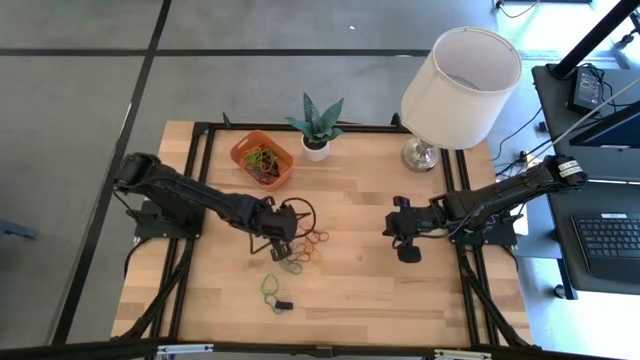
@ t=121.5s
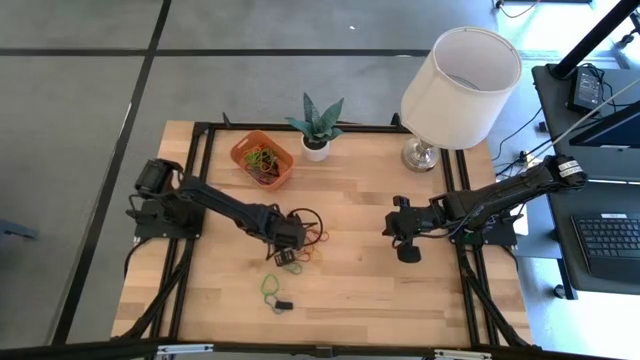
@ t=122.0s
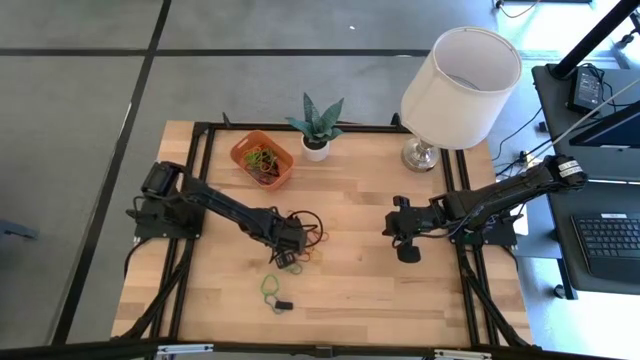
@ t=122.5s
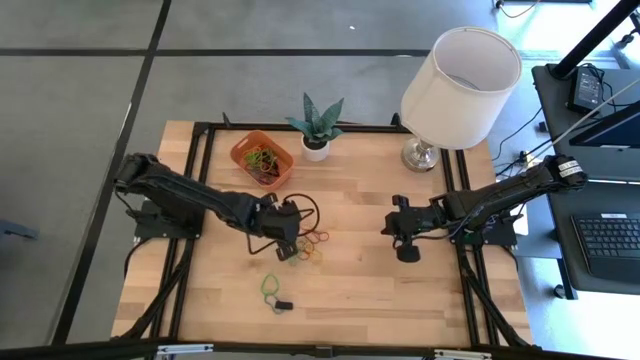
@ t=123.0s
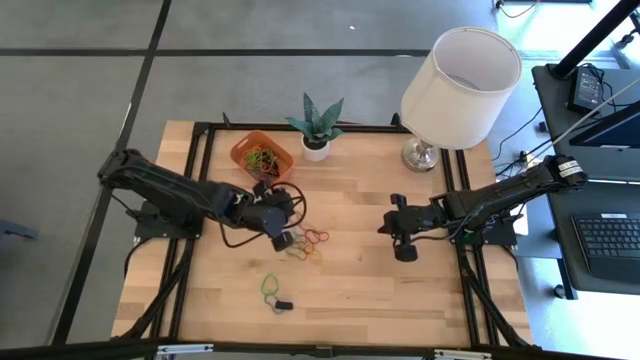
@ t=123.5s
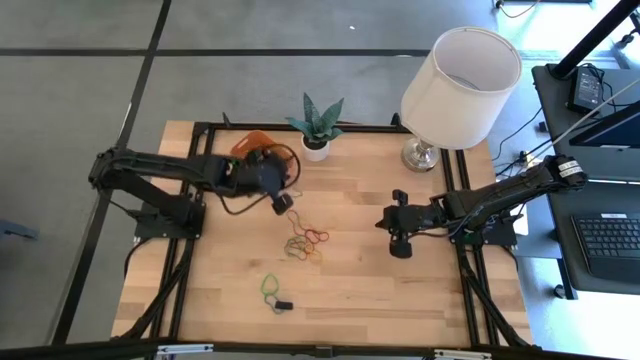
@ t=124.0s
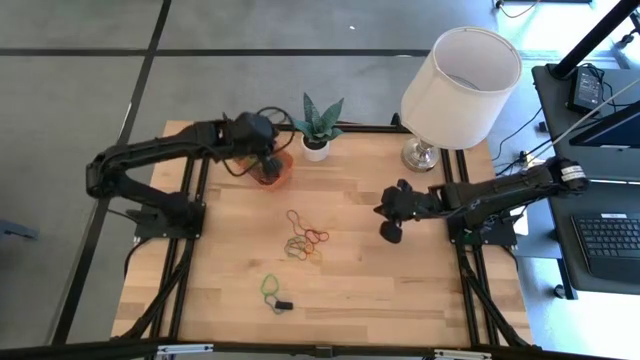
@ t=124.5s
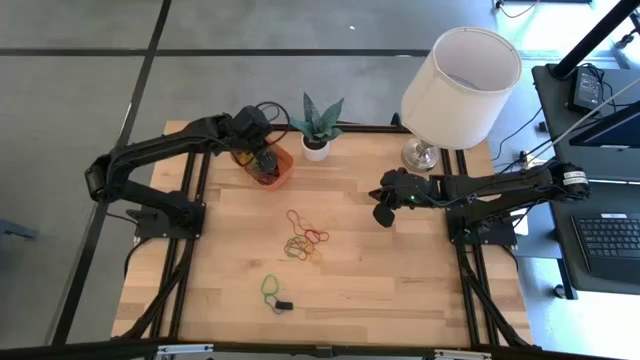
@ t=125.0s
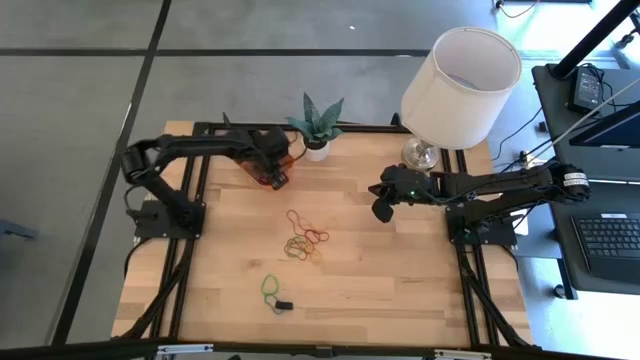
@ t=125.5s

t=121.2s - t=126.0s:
Task: Pick and place rubber bands into bin
Put the blue rubber band into the orange bin

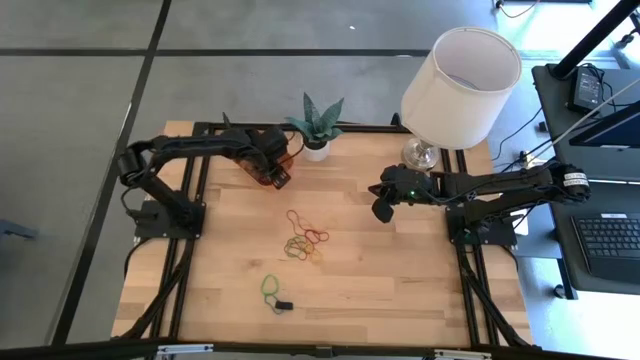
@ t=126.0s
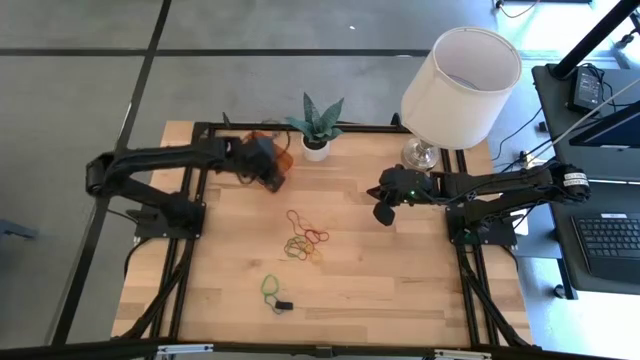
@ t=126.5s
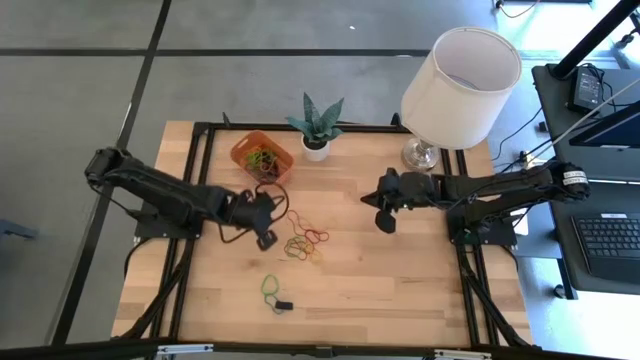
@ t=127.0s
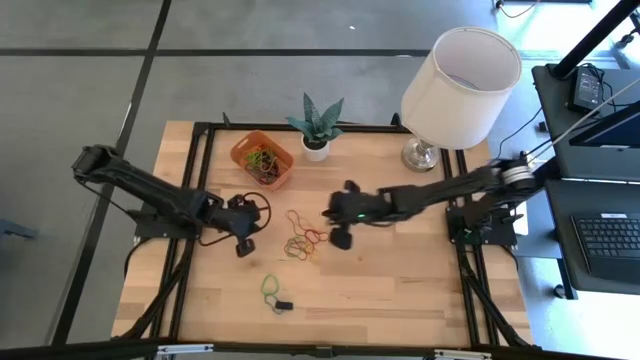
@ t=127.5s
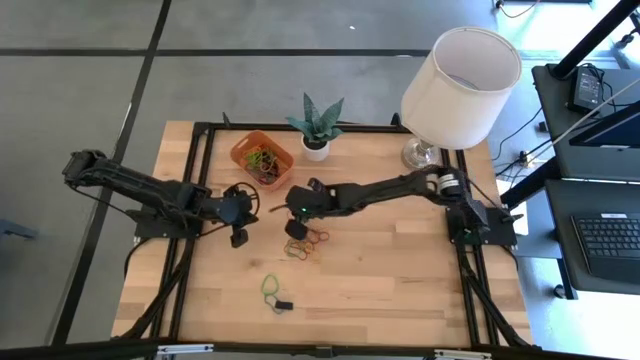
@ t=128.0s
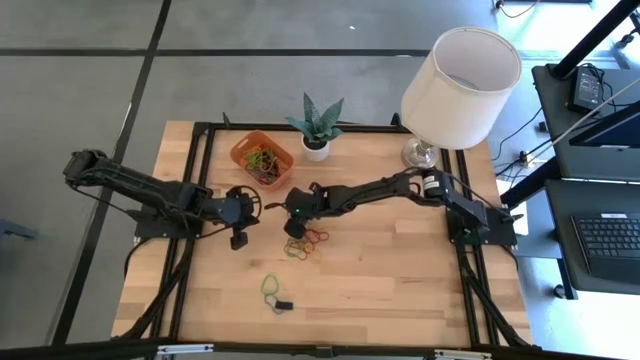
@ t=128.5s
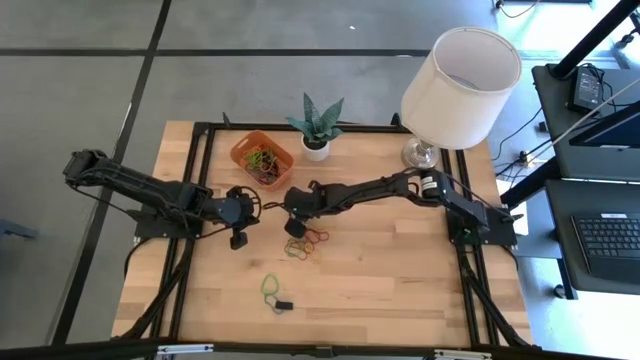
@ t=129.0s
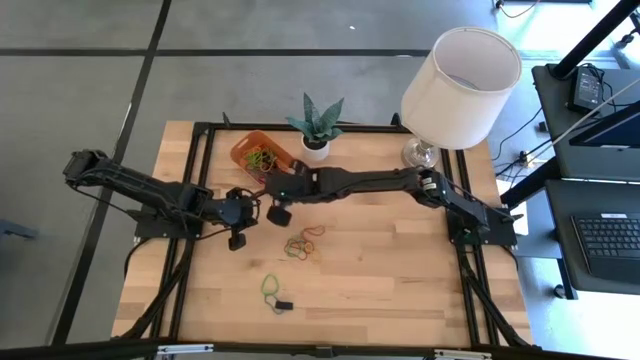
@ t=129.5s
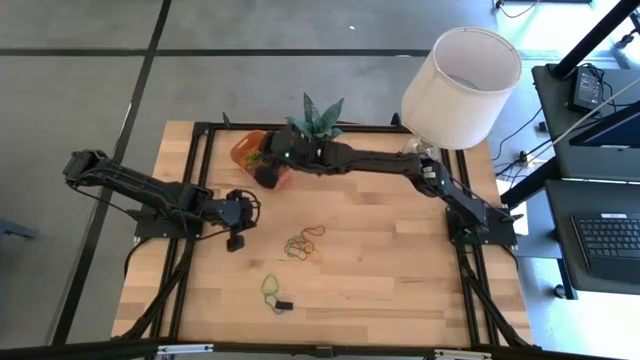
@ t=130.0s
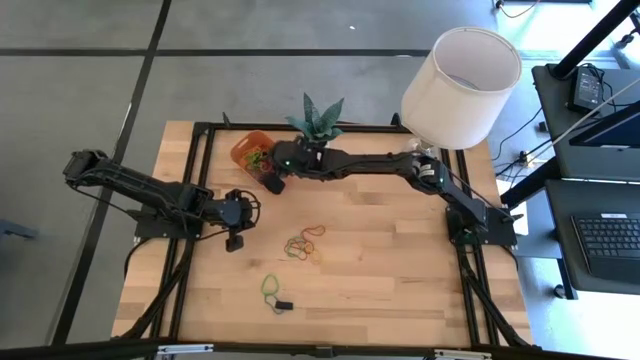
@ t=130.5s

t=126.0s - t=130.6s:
Put the red rubber band into the orange bin

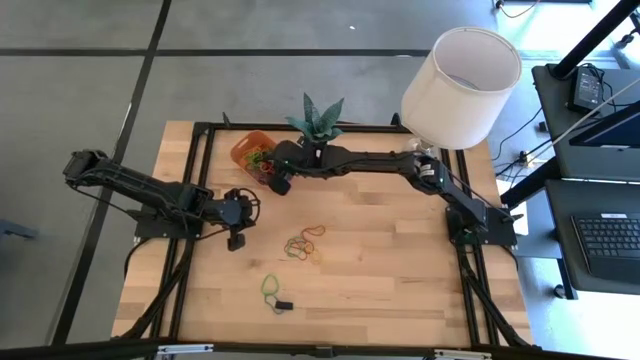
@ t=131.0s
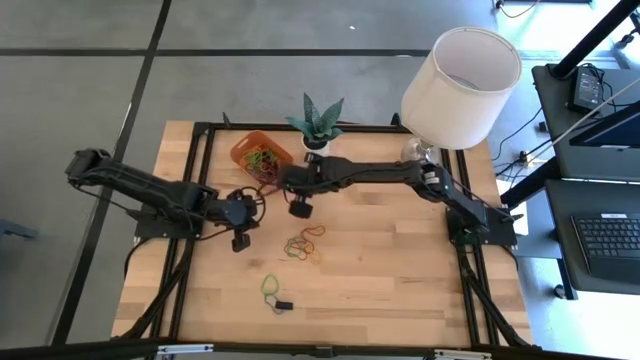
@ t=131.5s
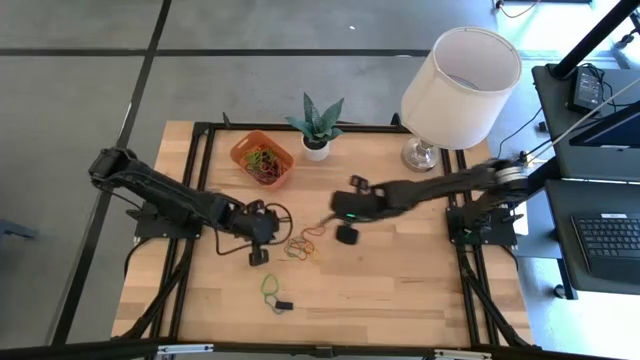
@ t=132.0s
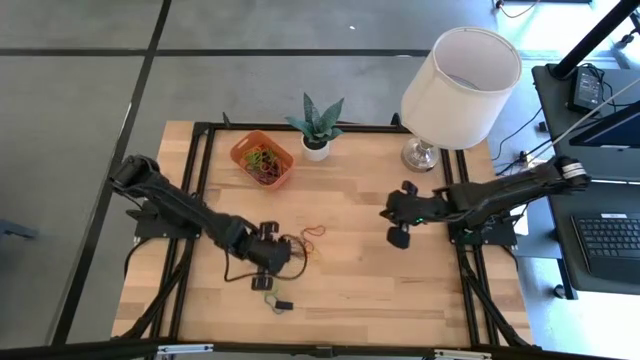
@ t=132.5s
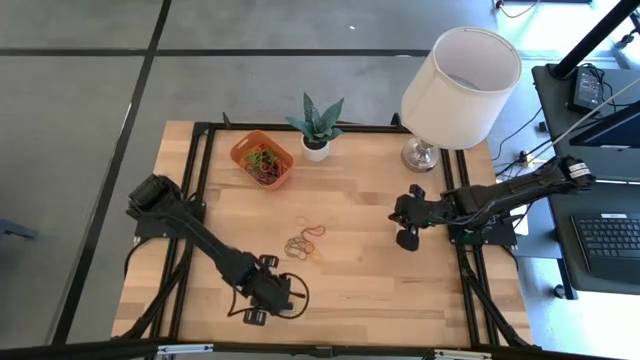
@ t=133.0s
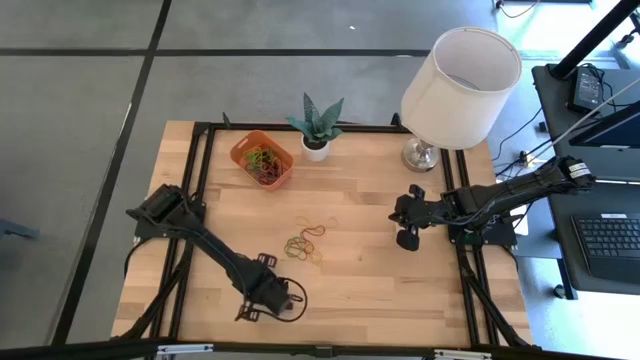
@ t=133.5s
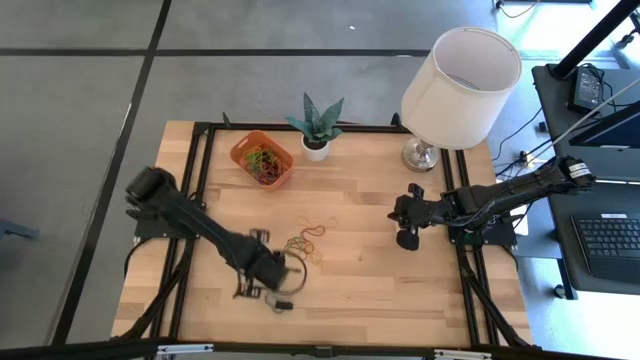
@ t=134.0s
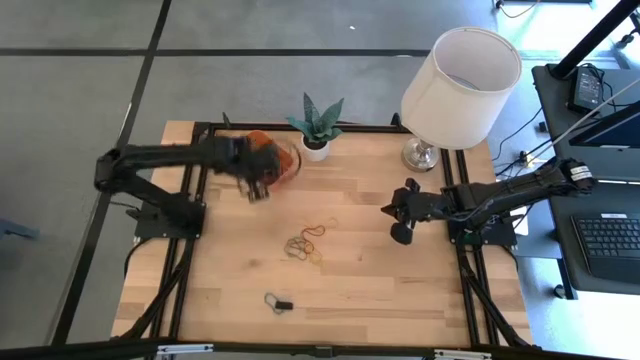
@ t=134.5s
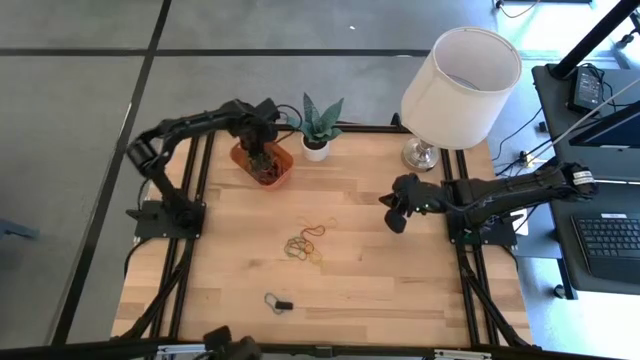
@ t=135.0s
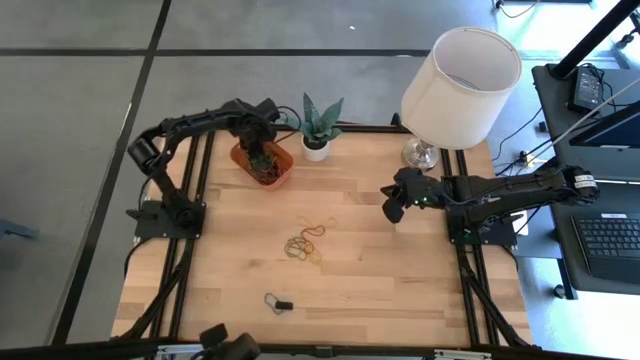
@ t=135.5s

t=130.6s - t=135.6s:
Put the green rubber band into the orange bin

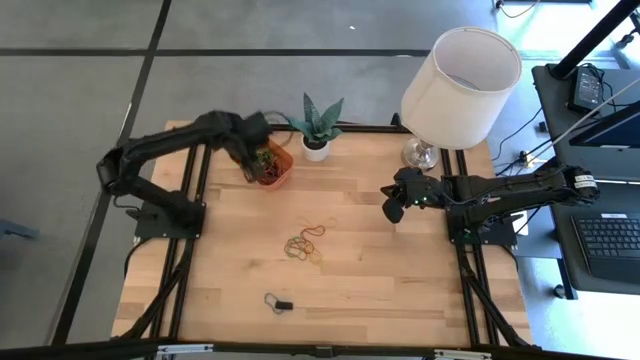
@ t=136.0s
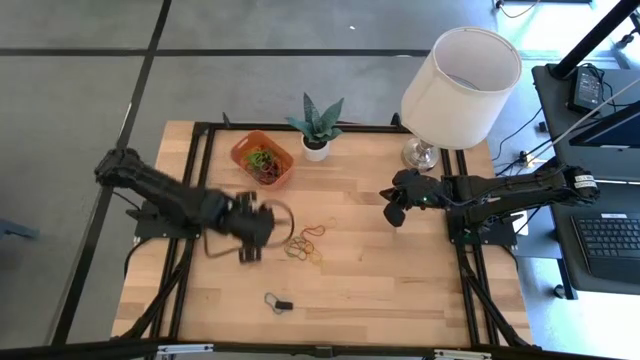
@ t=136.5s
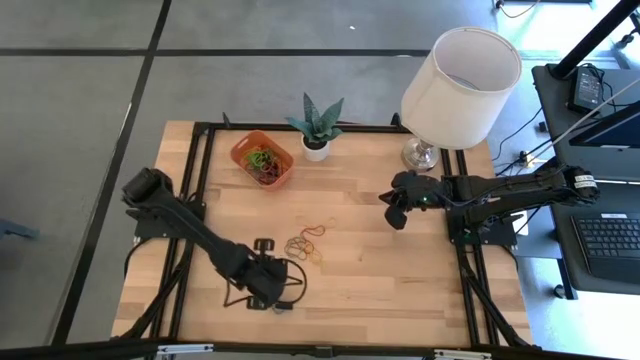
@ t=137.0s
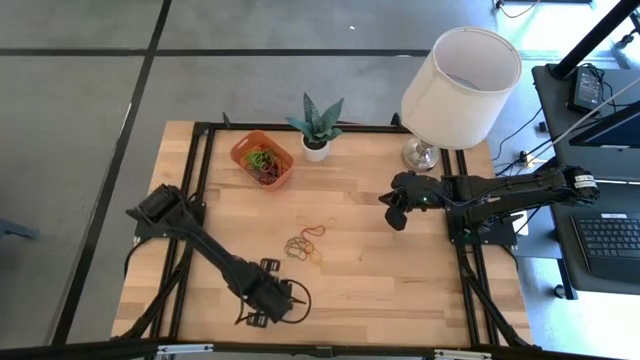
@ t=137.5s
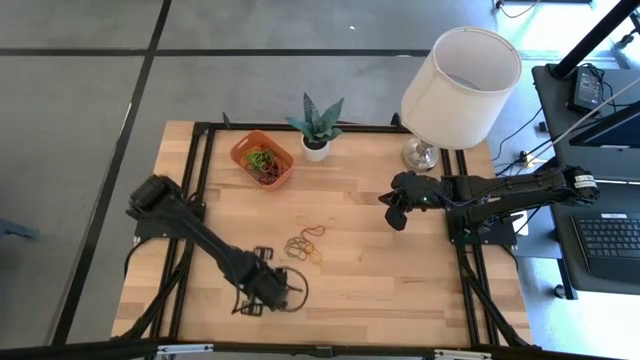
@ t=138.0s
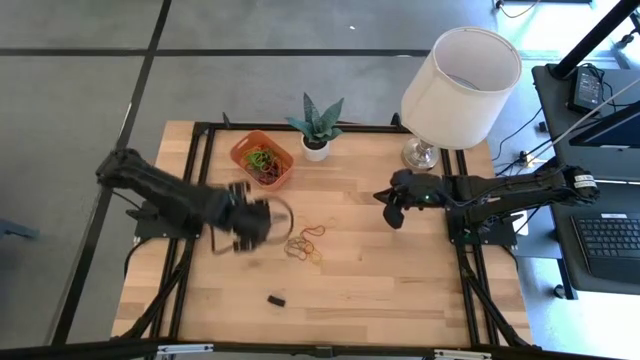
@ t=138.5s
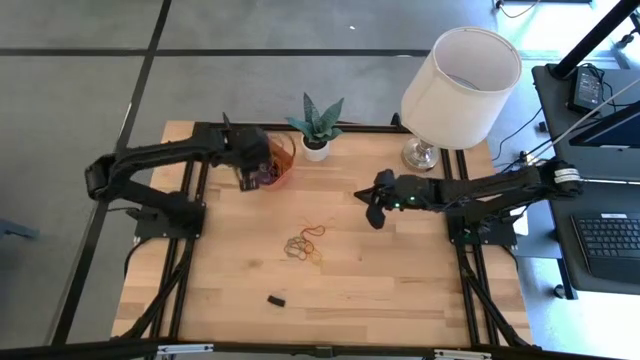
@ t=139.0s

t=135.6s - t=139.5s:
Put the blue rubber band into the orange bin

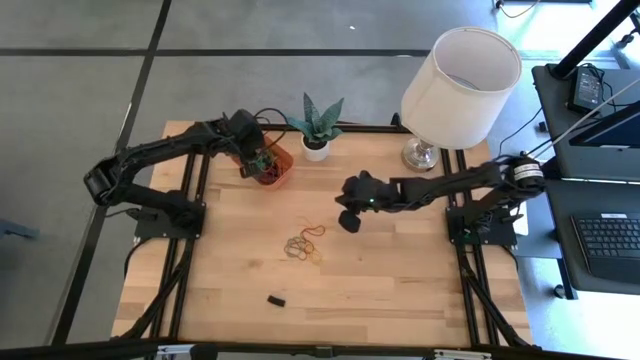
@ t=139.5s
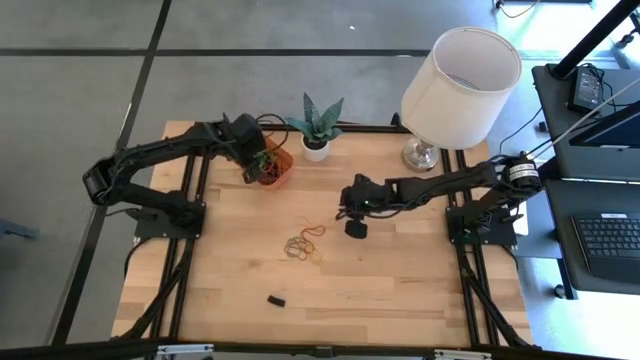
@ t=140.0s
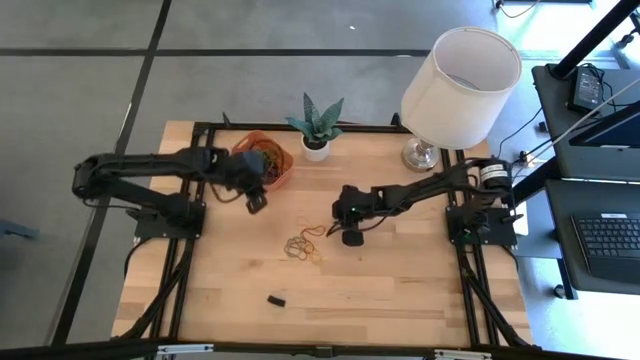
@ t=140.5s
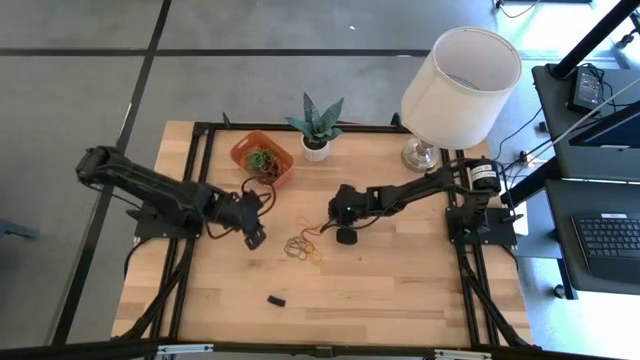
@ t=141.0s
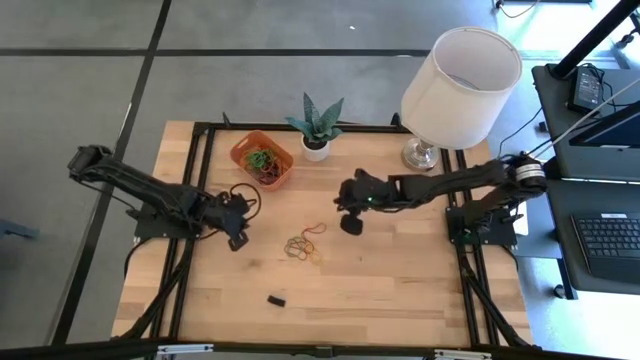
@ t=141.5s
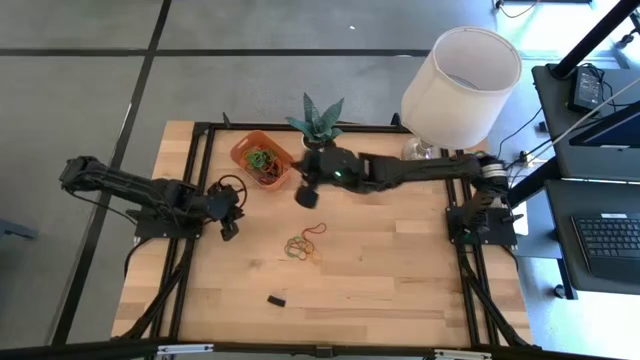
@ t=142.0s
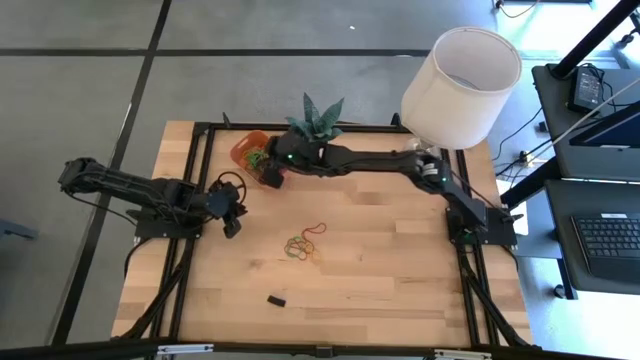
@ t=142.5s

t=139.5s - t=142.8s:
Put the yellow rubber band into the orange bin
